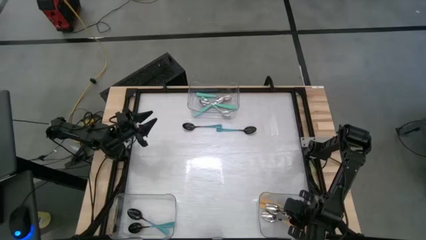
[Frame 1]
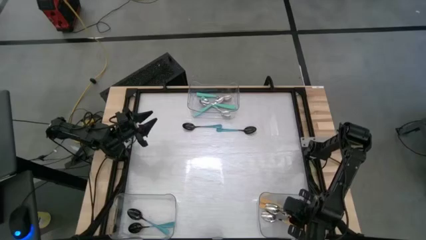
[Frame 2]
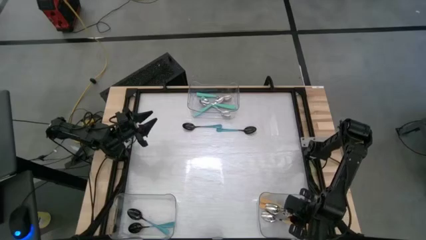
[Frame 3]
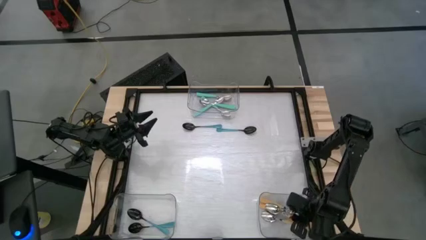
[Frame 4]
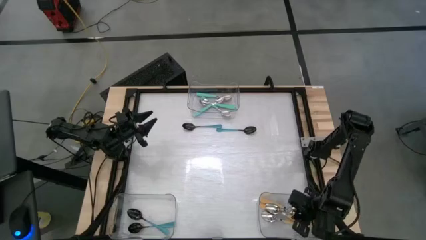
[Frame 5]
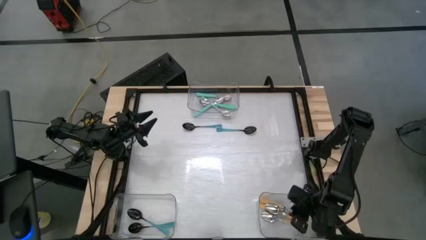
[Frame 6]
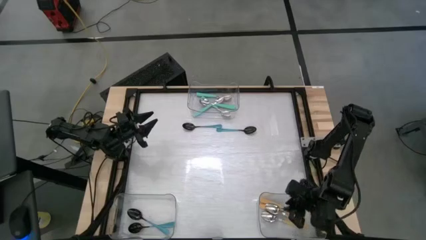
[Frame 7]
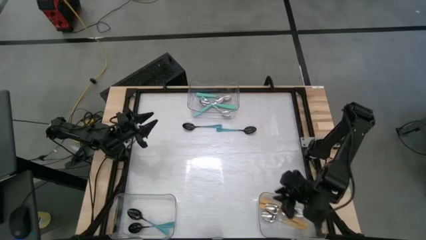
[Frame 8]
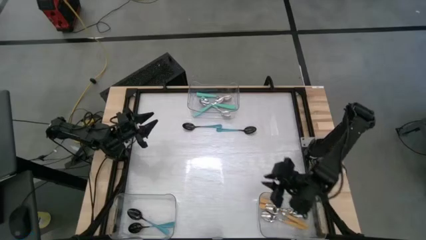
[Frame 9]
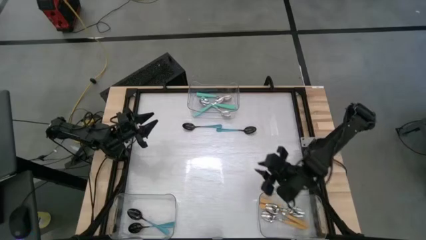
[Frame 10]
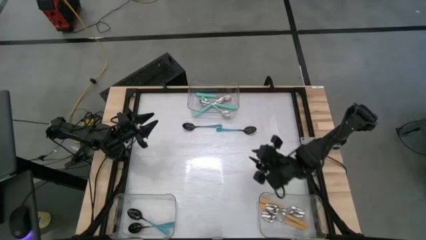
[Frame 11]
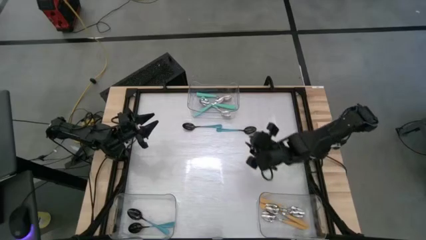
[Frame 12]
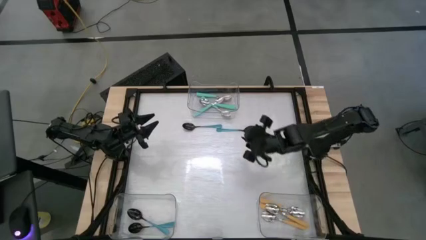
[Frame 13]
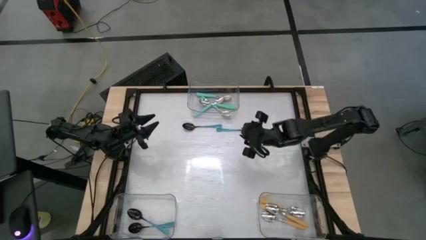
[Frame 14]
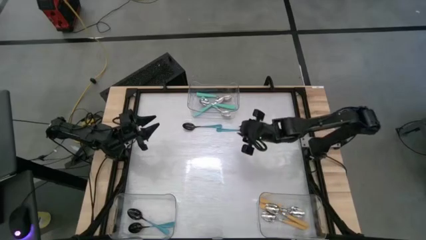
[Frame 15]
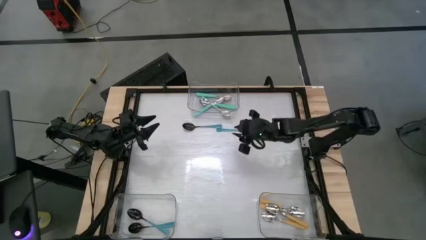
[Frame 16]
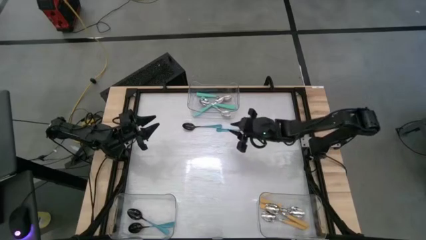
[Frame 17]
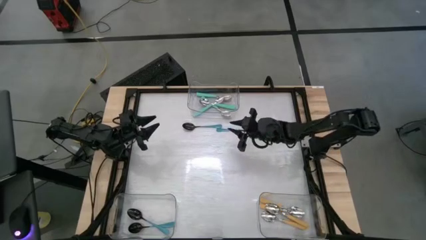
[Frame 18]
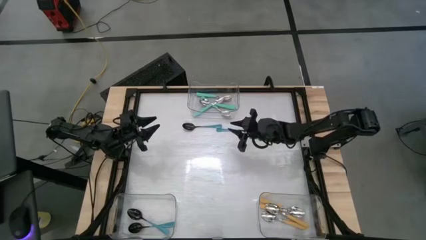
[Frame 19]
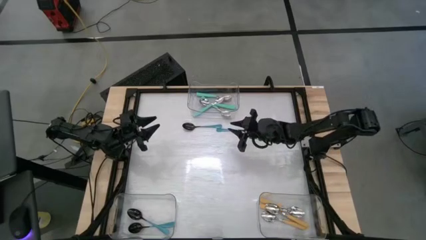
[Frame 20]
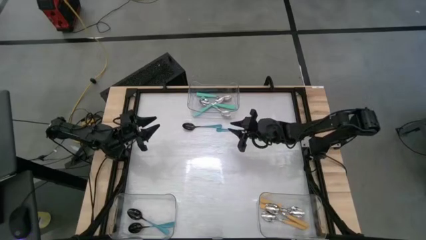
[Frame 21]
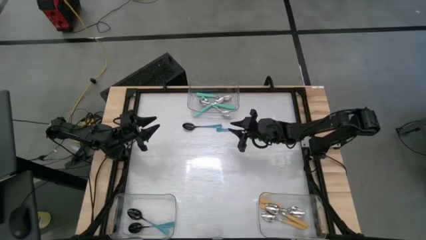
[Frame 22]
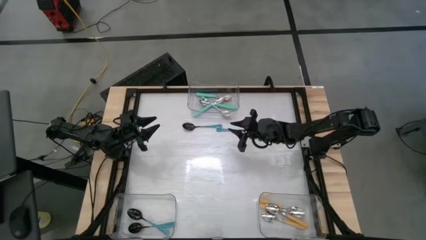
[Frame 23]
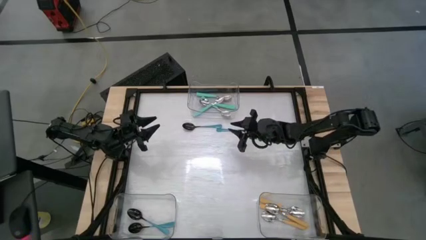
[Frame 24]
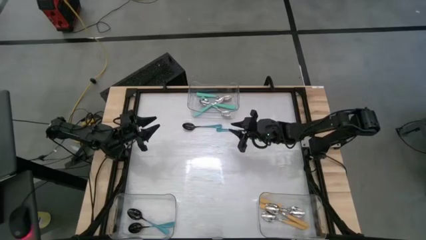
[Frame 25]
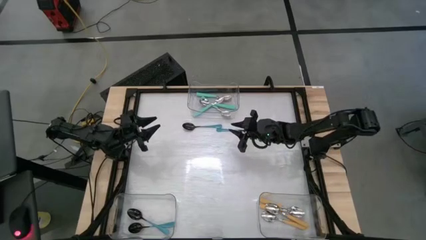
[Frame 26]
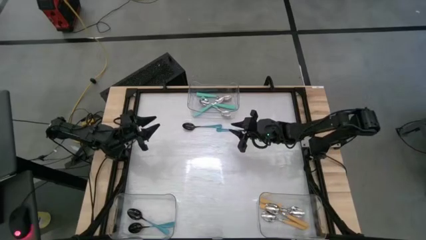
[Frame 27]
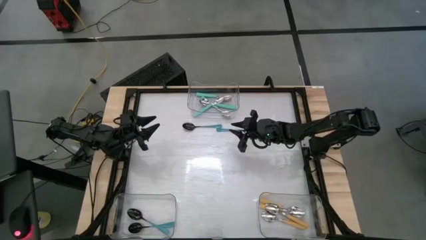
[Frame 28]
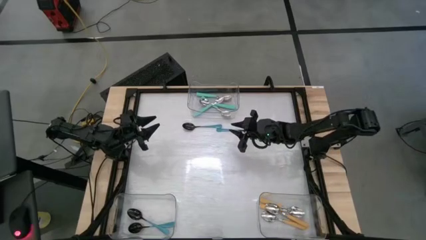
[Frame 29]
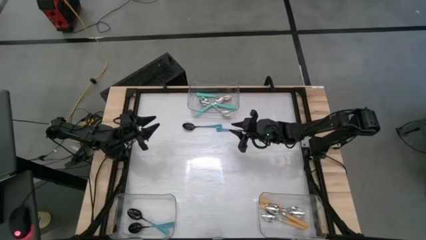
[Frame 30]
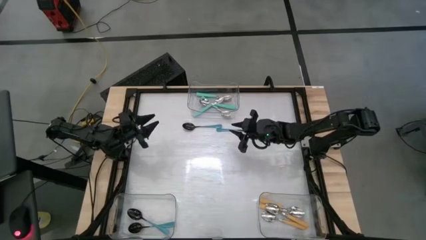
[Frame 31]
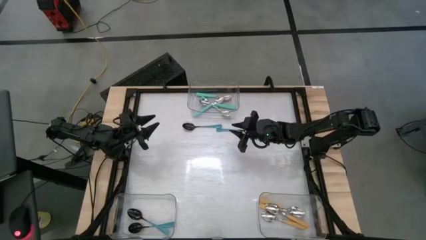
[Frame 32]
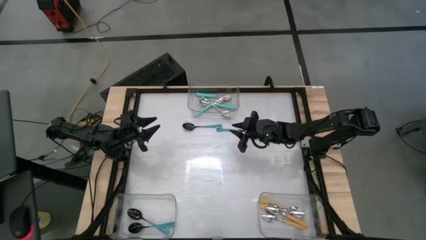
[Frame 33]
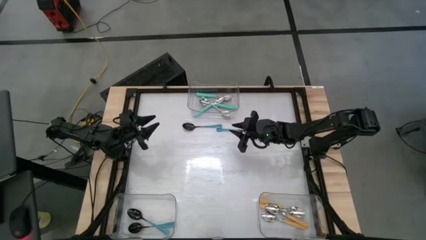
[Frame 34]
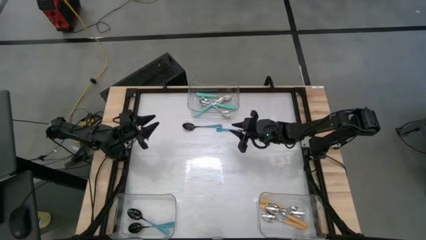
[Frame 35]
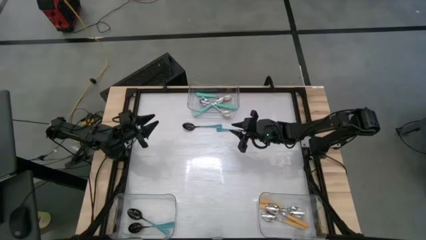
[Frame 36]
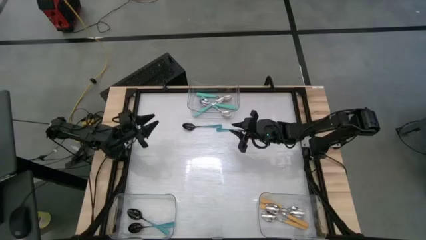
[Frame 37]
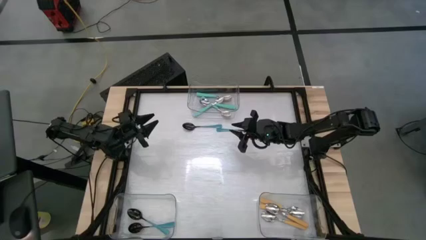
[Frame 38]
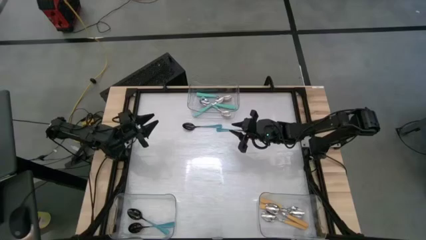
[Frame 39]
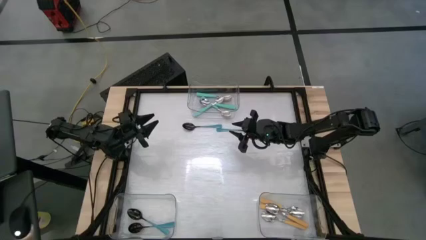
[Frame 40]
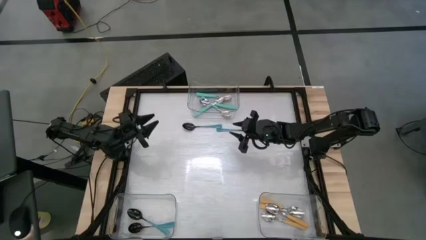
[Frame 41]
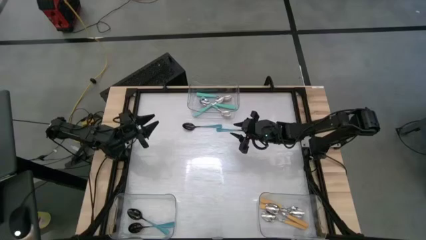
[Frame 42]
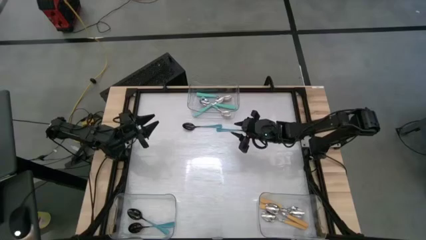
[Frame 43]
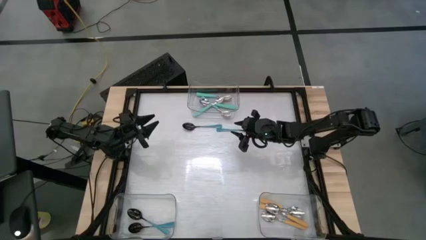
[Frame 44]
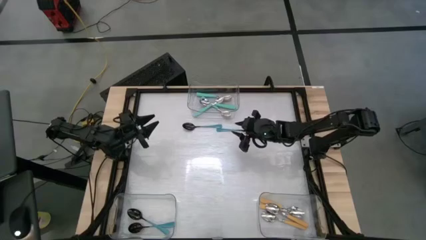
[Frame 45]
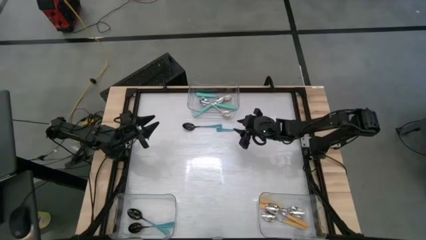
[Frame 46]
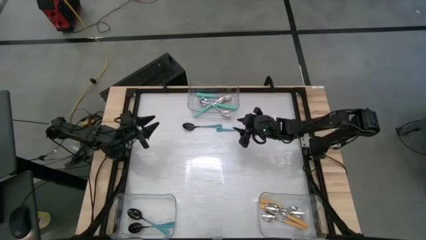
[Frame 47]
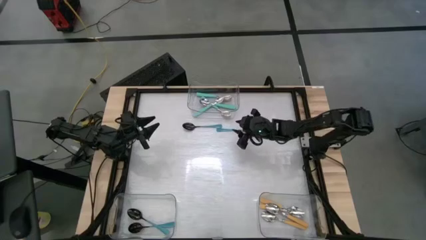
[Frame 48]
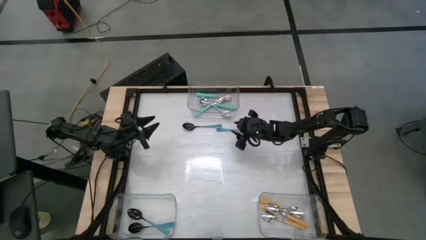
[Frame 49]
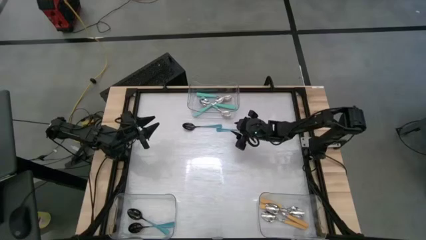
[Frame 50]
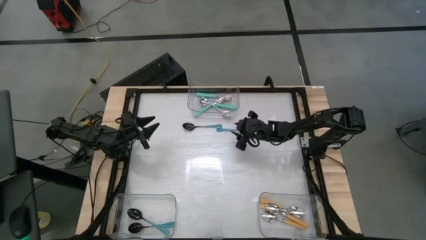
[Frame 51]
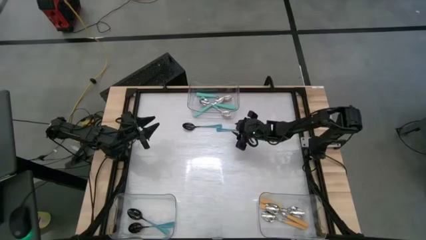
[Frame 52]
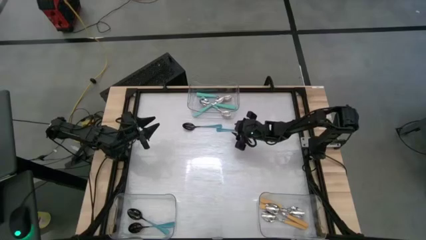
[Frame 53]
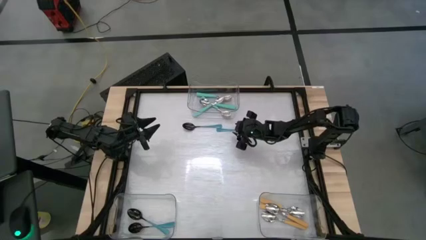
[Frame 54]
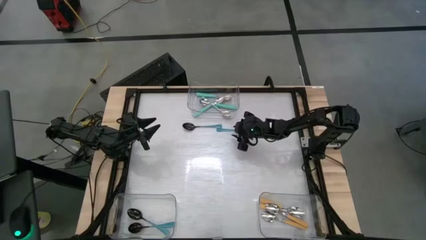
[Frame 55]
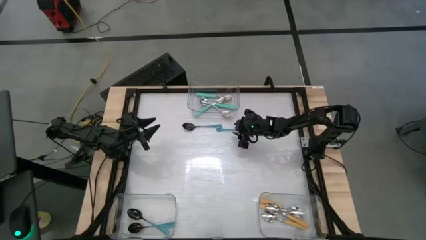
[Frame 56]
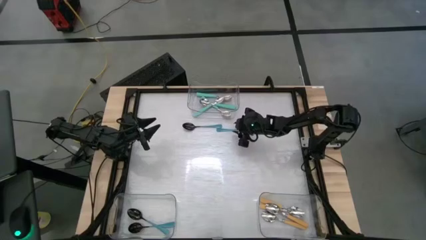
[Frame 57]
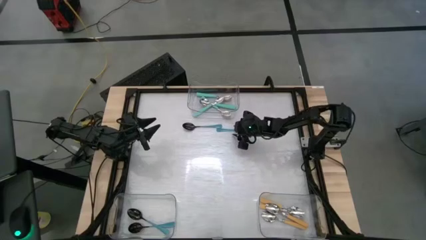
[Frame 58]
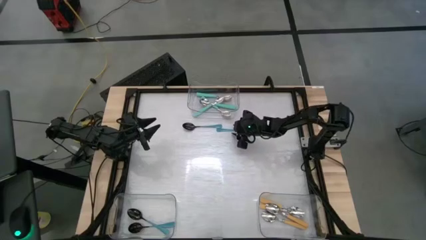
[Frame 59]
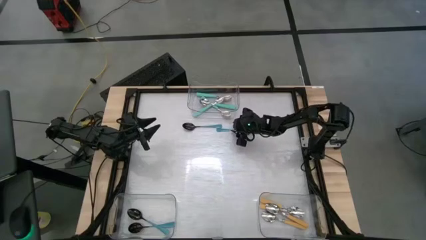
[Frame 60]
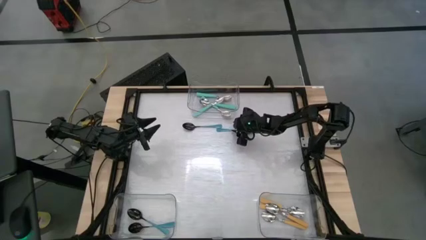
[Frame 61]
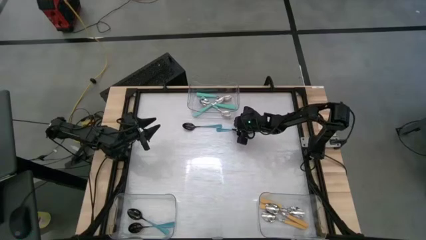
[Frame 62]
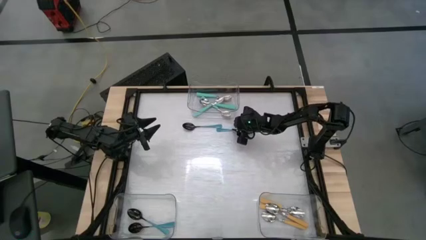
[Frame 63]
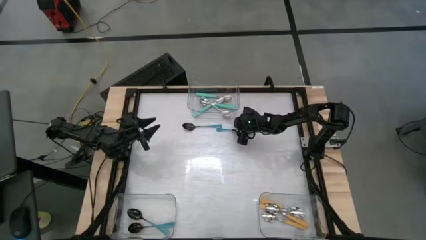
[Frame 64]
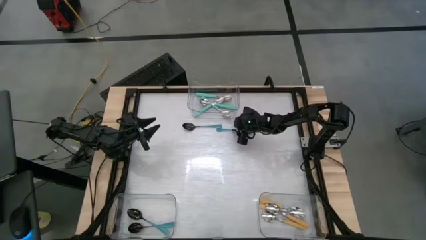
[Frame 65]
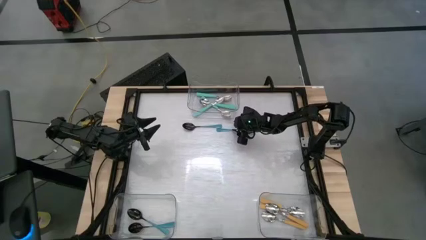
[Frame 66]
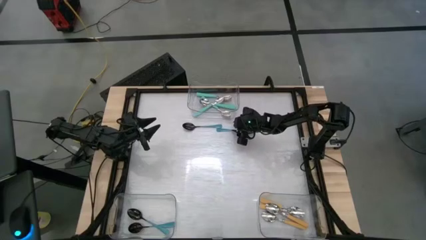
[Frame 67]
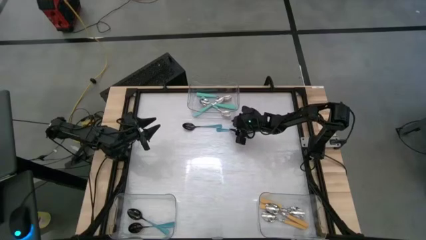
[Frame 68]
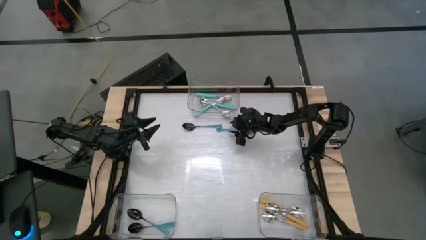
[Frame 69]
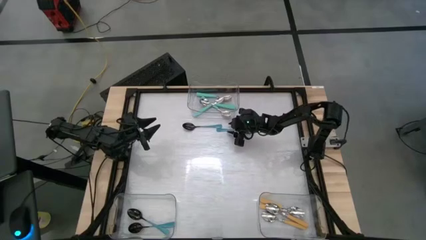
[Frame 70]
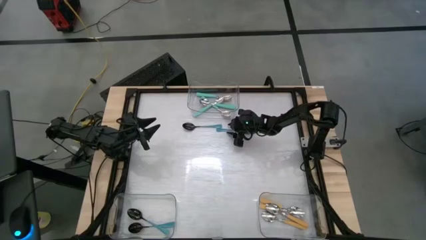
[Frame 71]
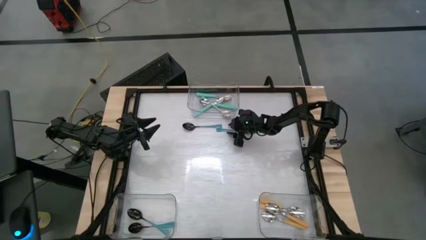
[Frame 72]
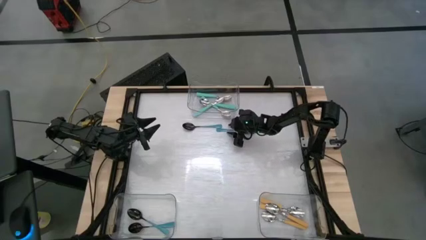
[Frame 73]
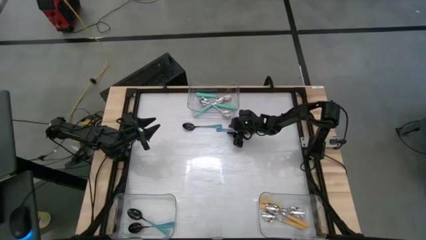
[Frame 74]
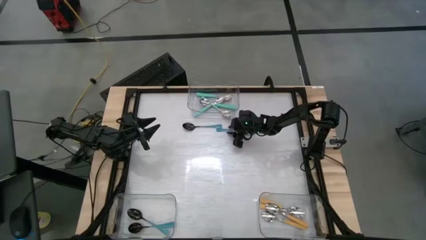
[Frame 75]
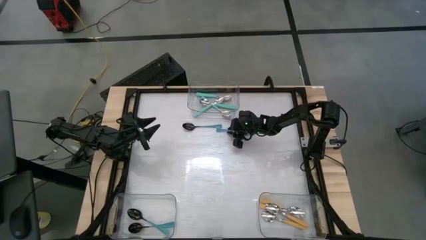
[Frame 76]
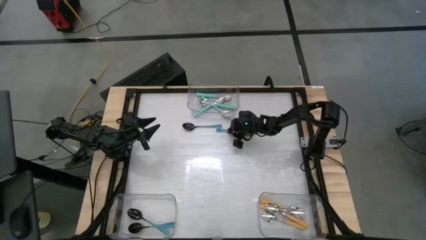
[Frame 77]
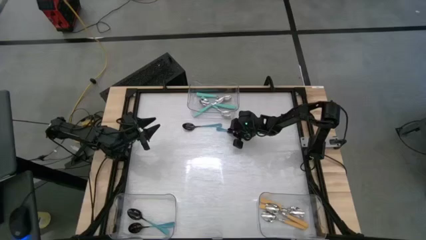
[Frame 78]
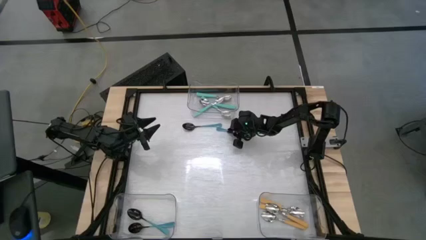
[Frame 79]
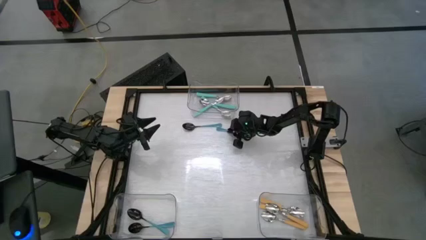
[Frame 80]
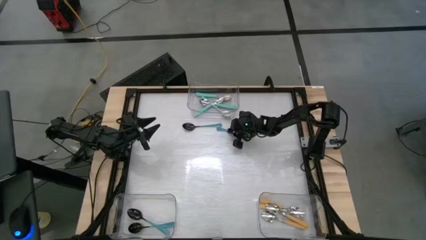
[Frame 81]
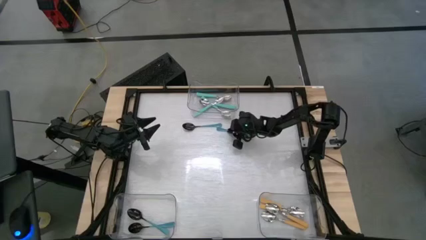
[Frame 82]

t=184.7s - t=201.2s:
Task: Sort silverware by color (type)
Put the right black spoon into the bottom left transparent bin
